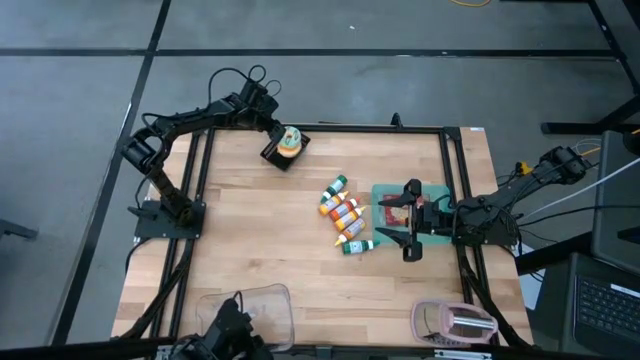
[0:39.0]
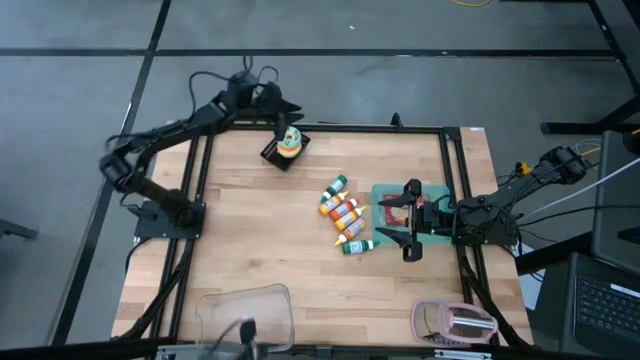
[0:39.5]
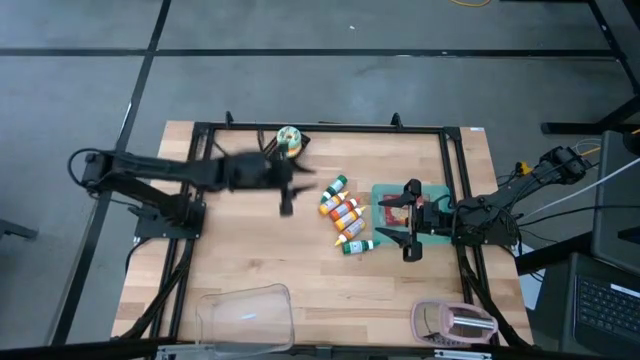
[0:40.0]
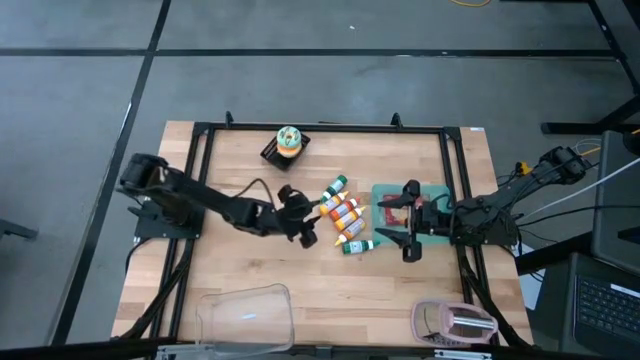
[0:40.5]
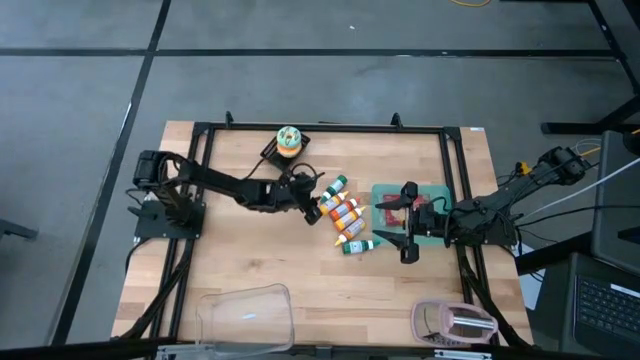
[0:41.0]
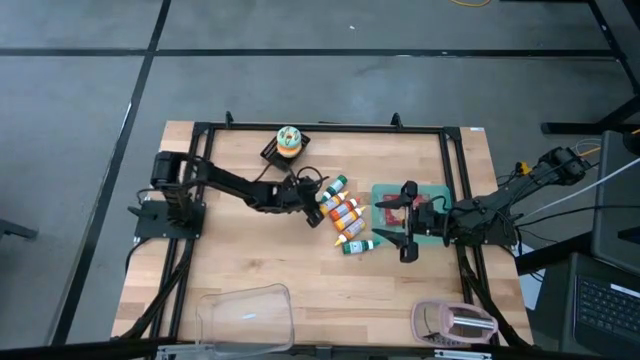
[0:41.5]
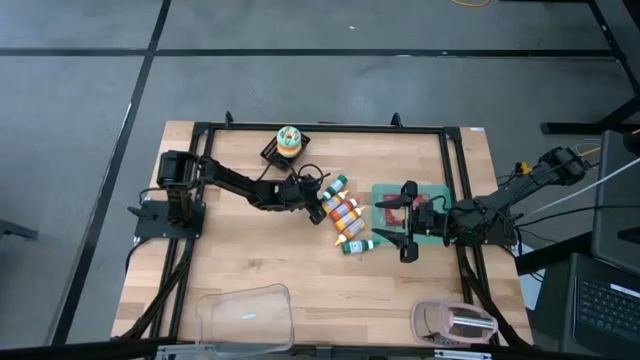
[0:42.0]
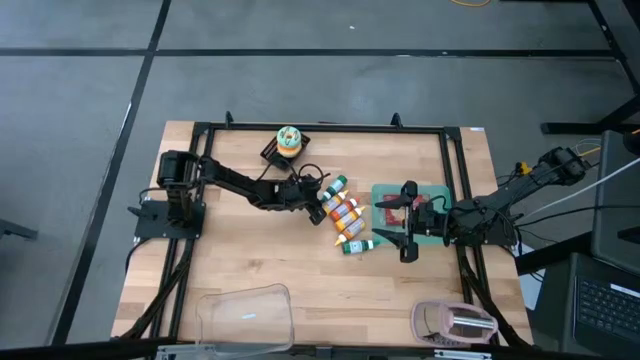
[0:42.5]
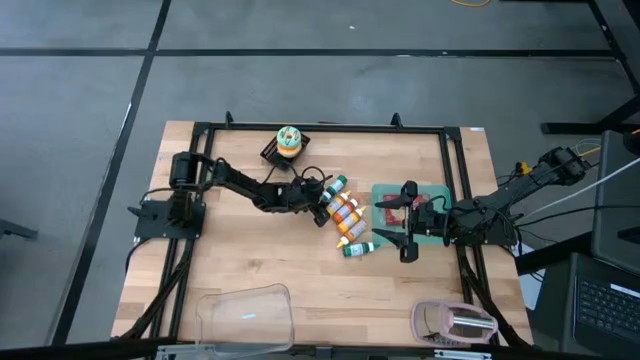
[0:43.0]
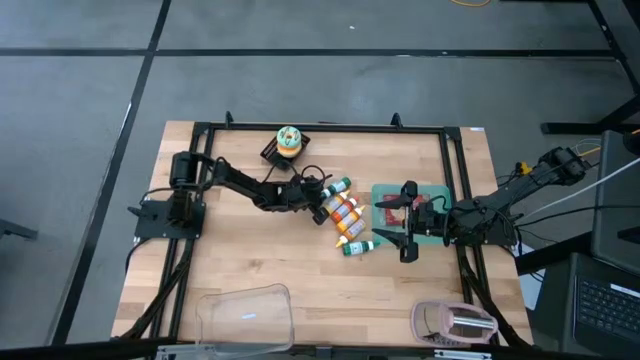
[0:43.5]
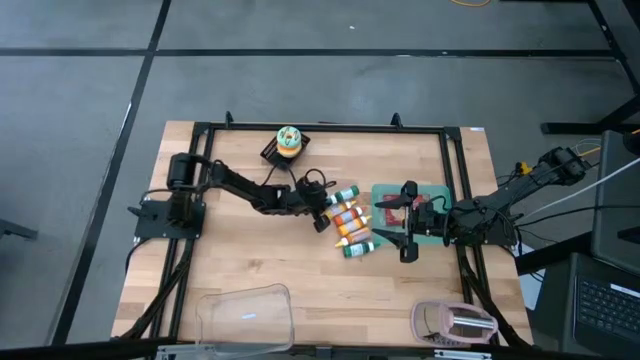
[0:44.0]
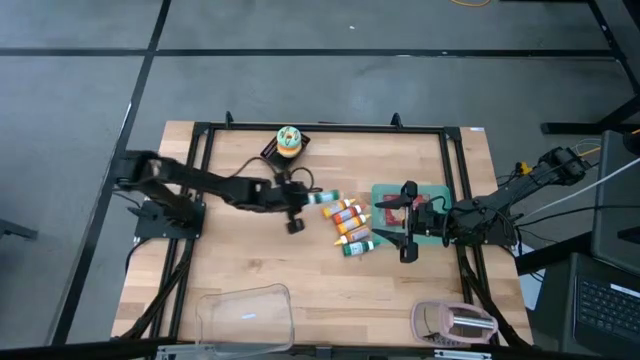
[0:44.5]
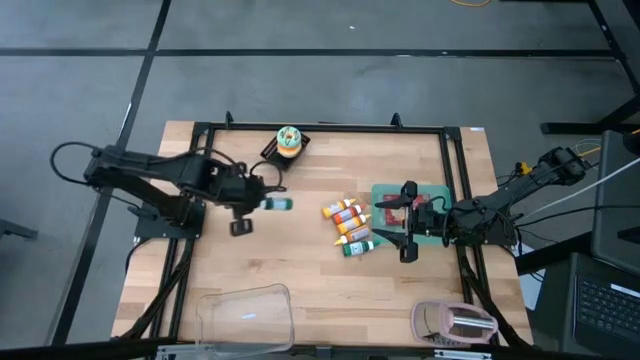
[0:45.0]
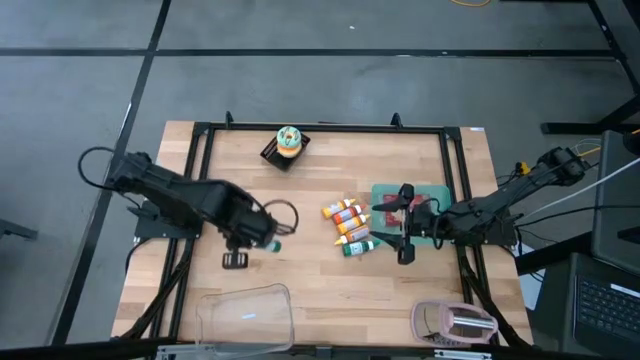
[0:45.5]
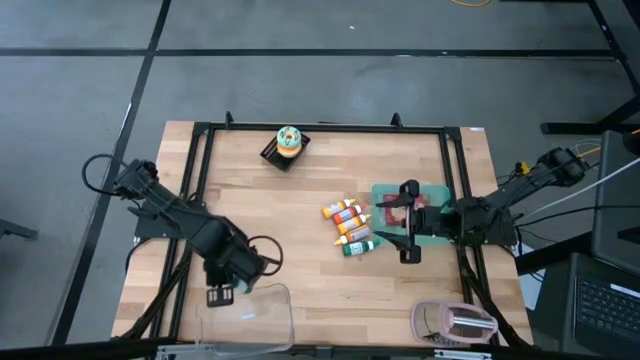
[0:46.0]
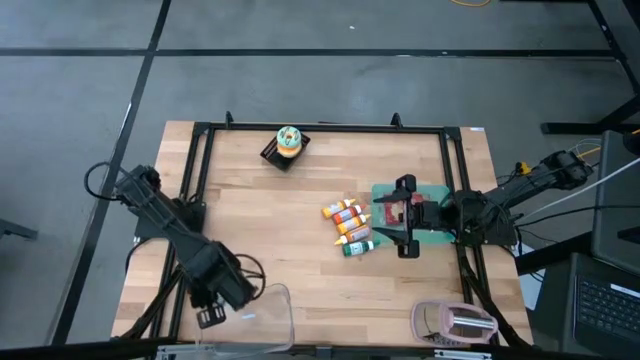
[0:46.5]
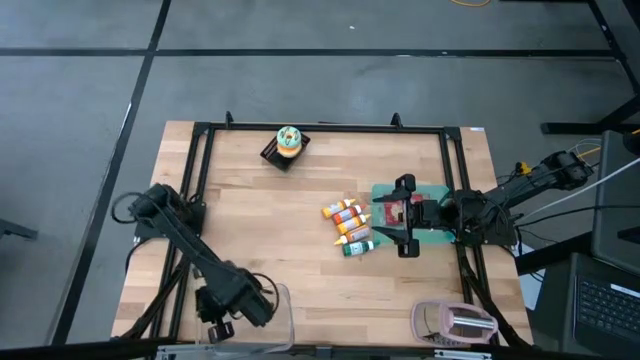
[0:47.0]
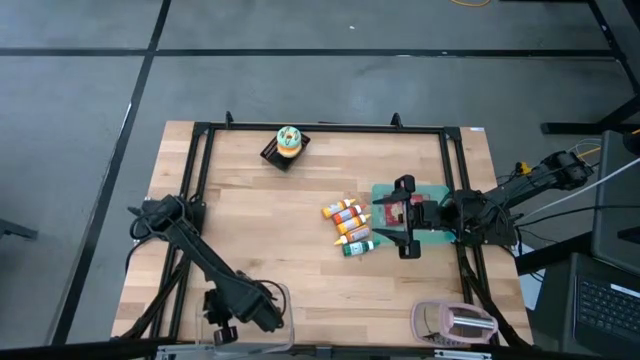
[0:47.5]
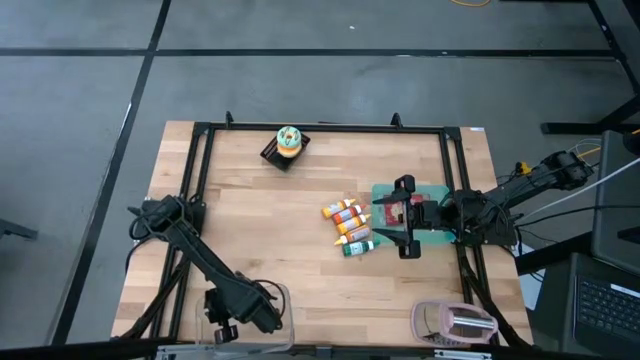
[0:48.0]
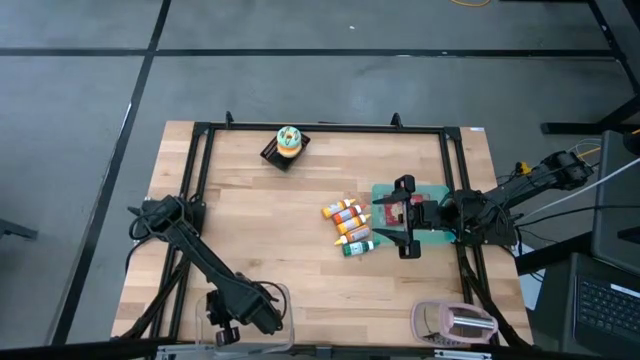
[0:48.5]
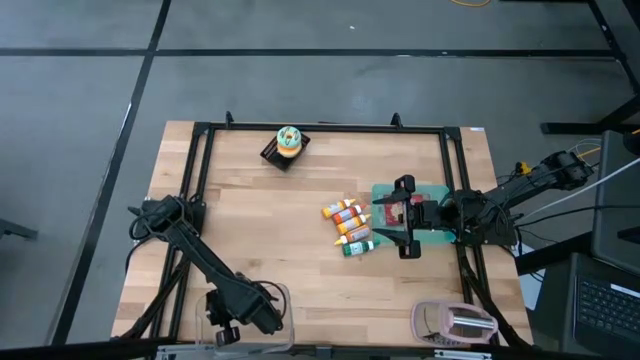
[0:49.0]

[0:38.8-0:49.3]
Put the top green food coloring bottle into the transparent bin

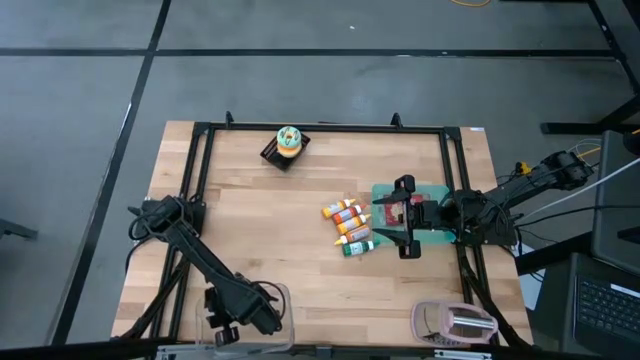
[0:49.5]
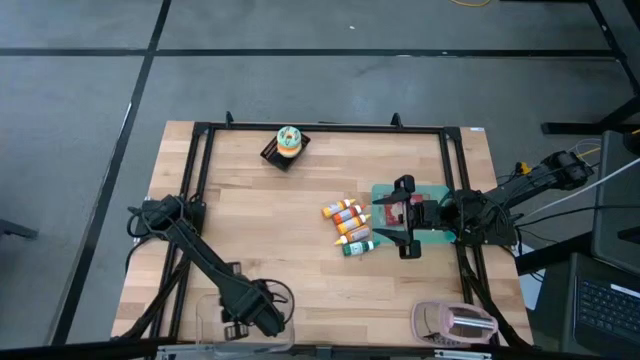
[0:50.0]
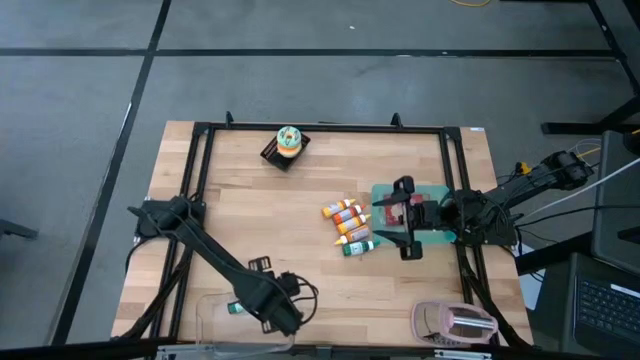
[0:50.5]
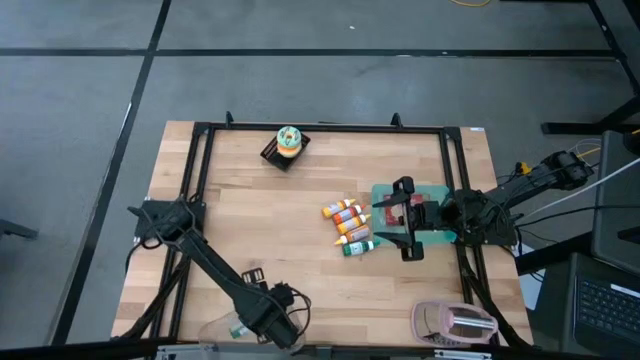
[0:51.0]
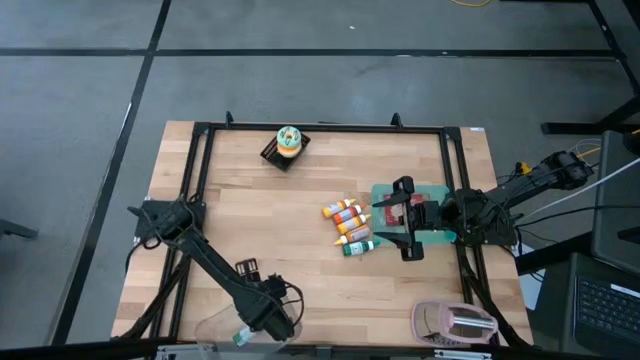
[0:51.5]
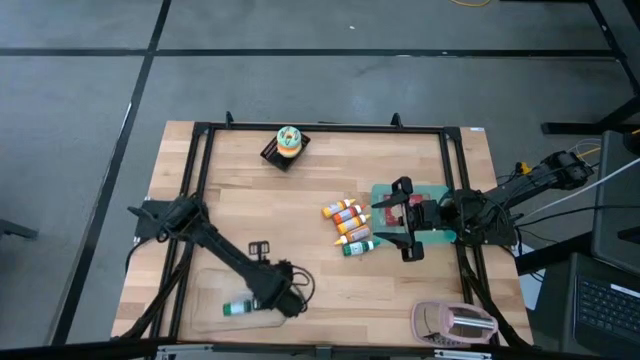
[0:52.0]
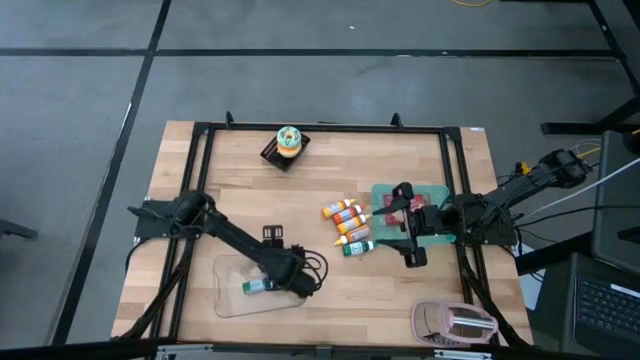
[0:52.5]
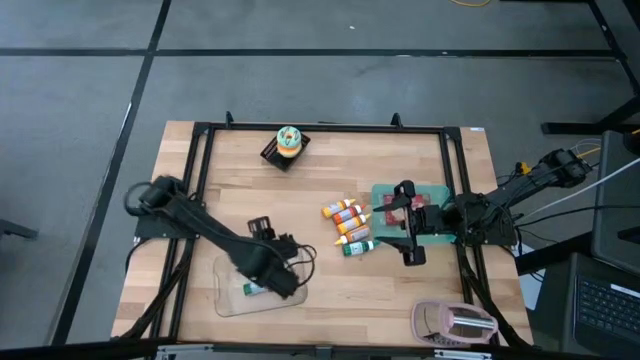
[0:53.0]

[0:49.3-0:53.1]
Adjust the transparent bin
